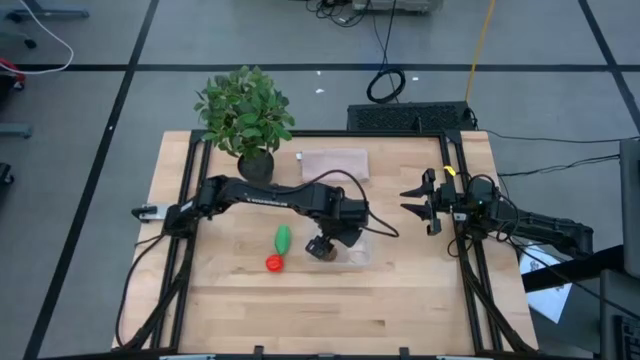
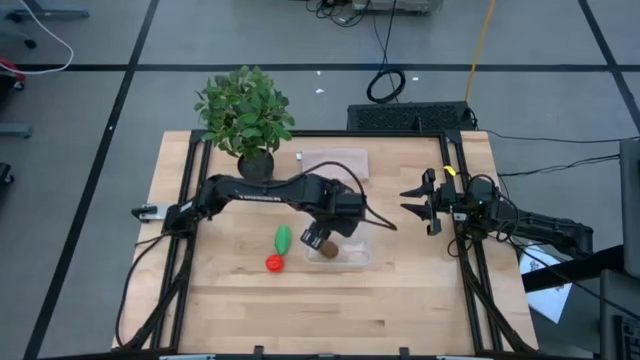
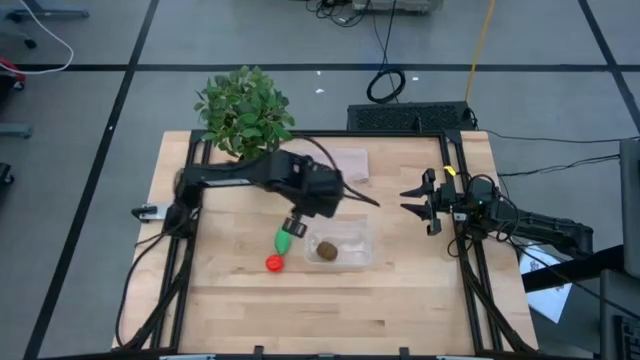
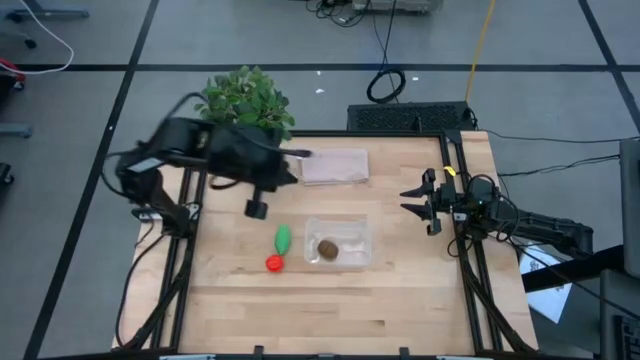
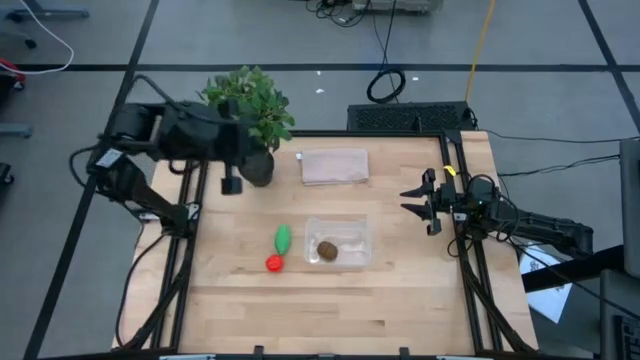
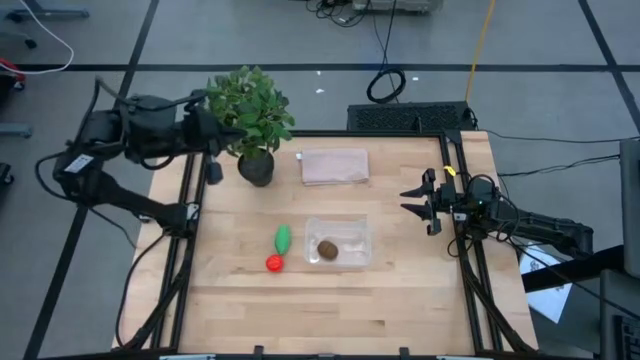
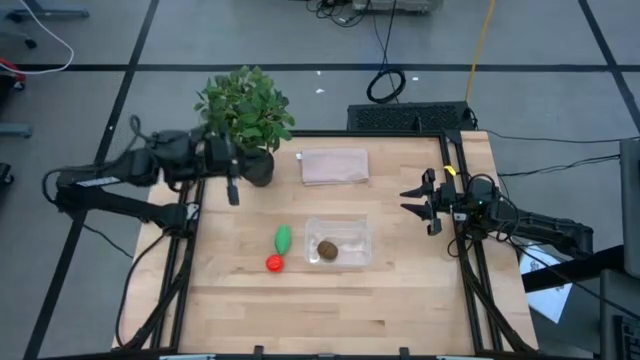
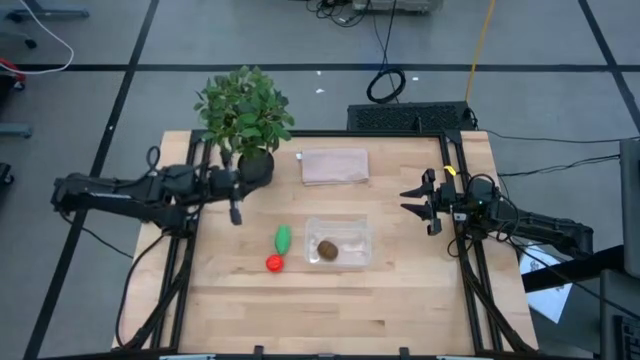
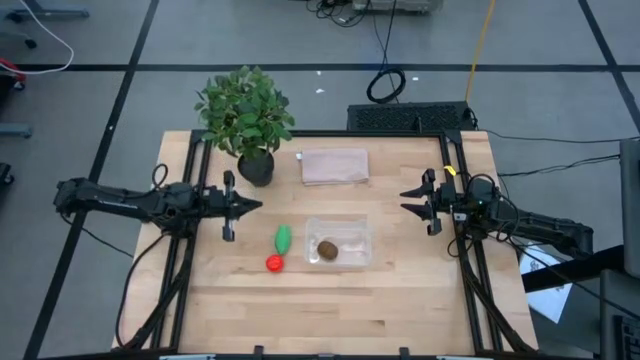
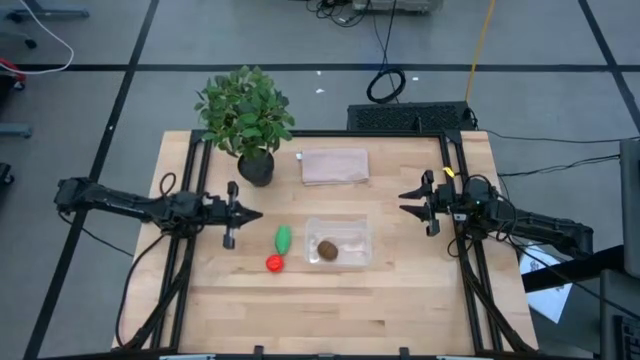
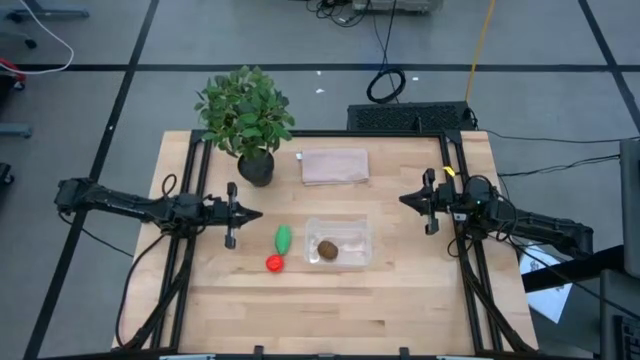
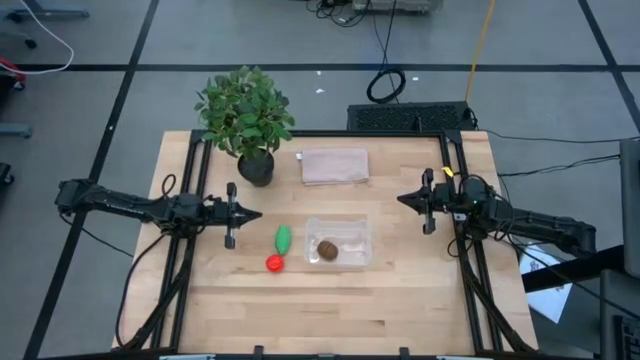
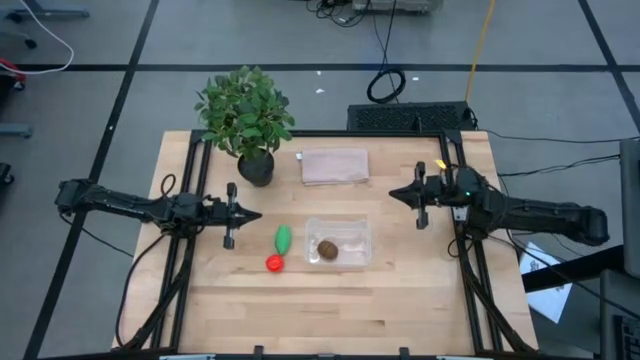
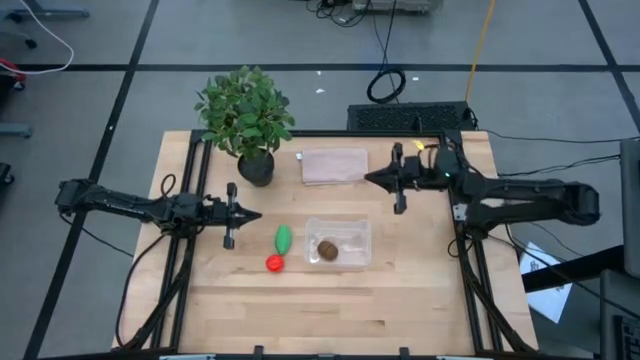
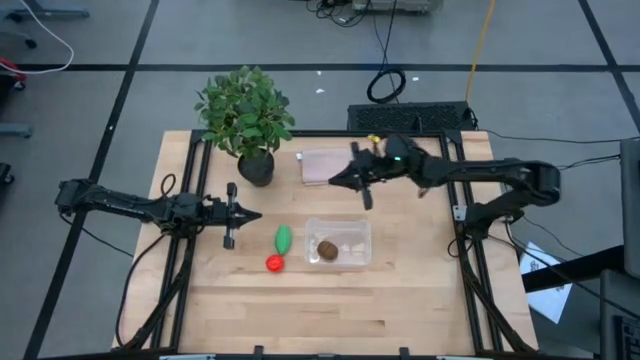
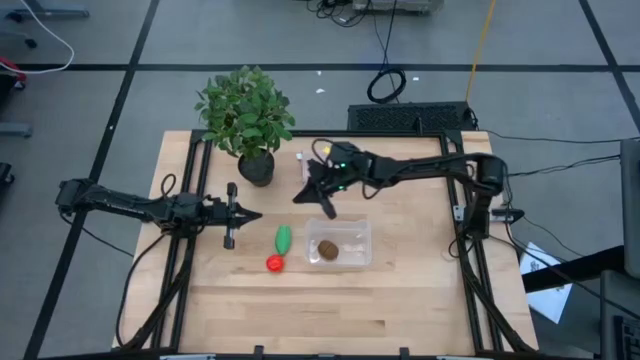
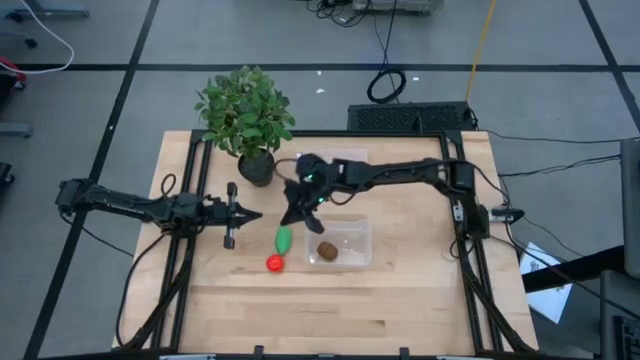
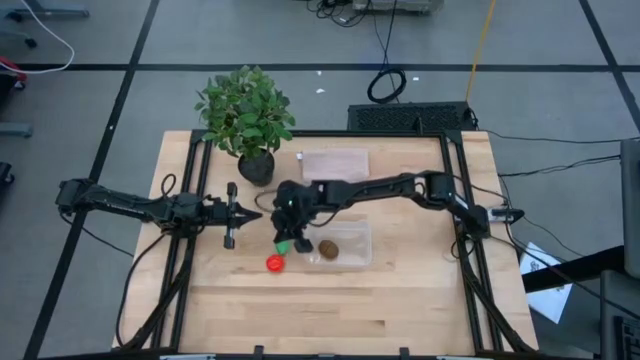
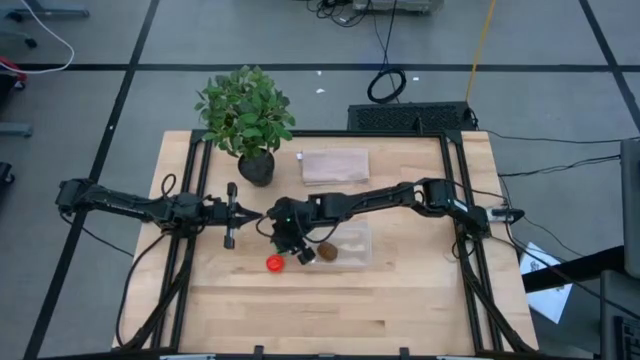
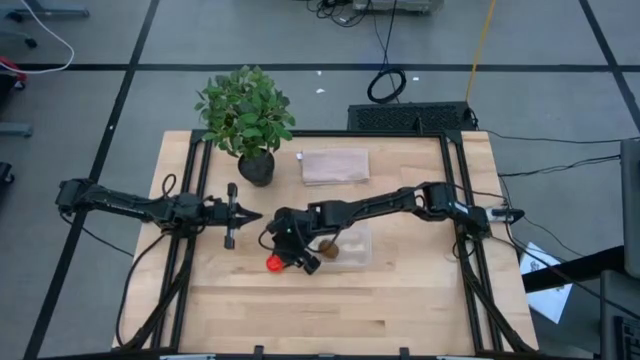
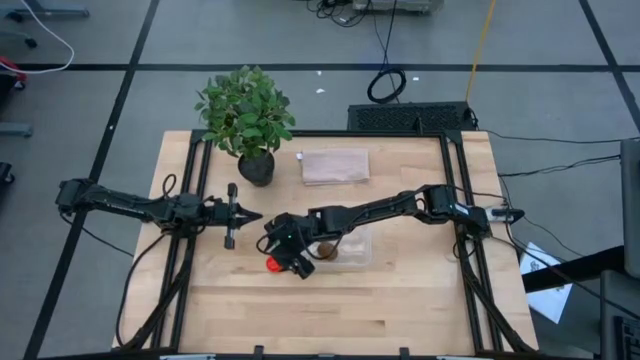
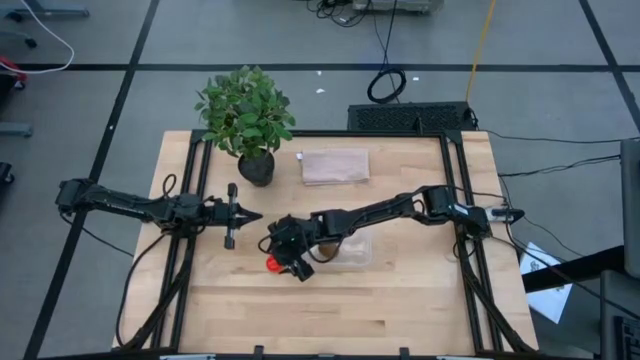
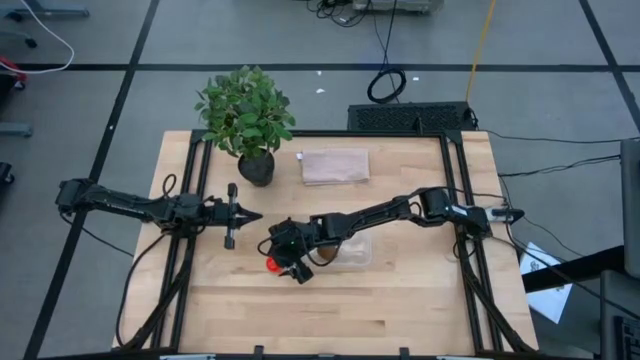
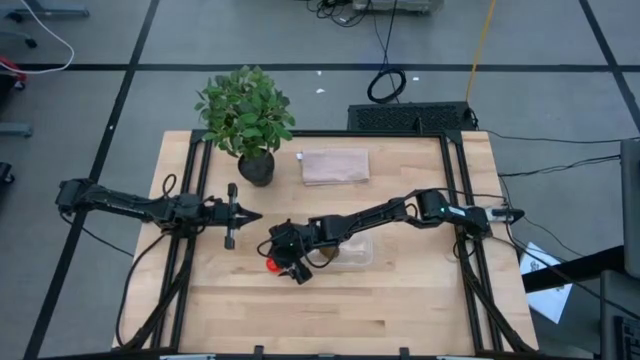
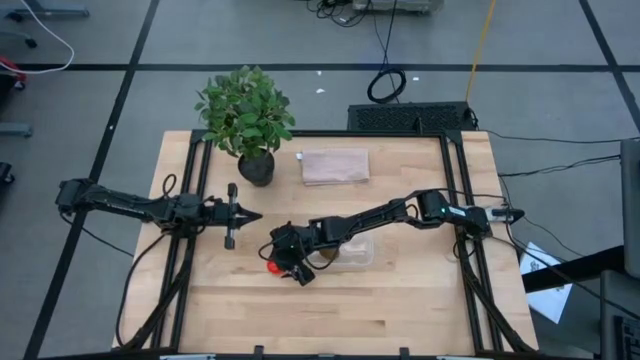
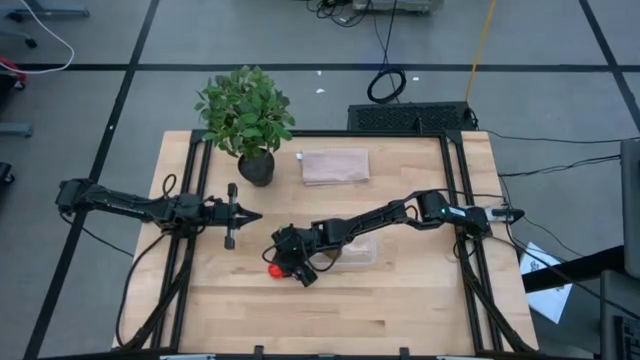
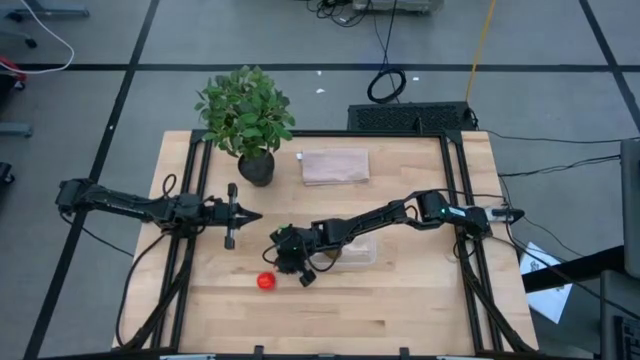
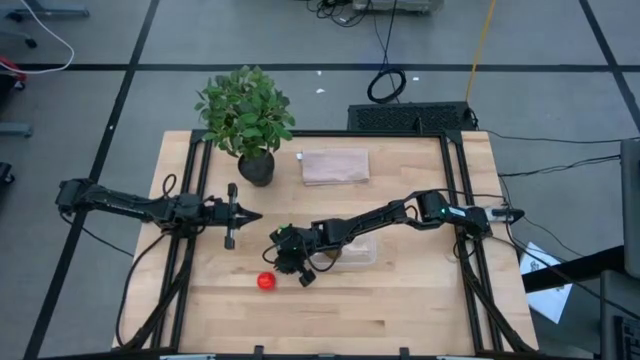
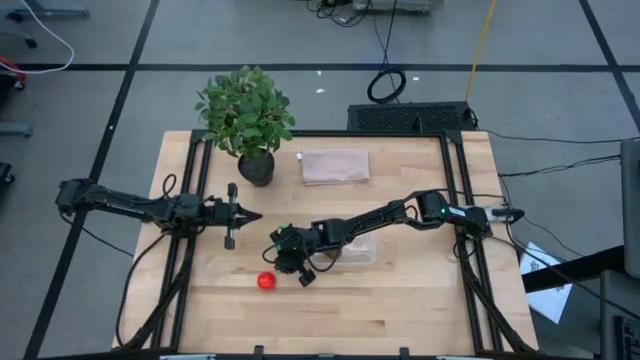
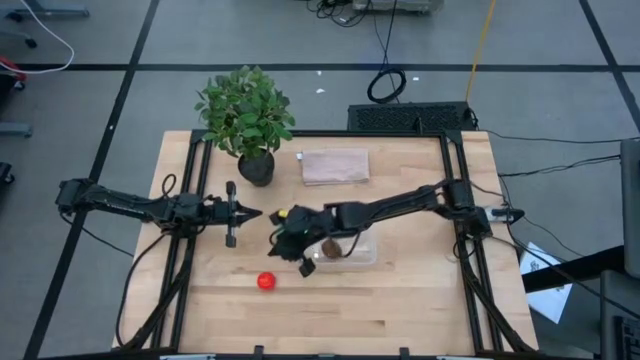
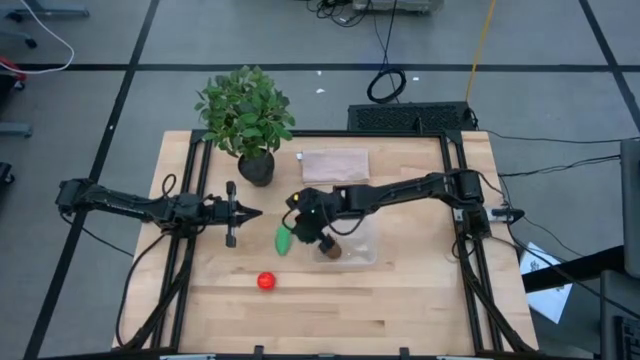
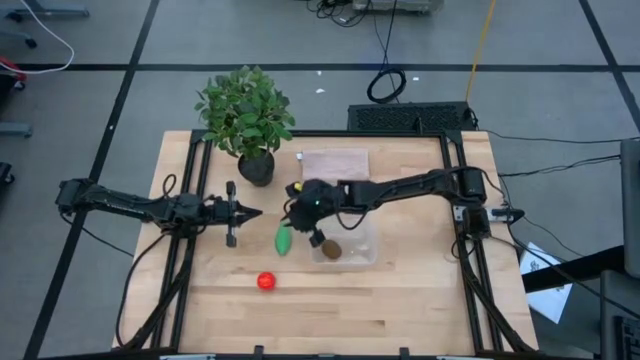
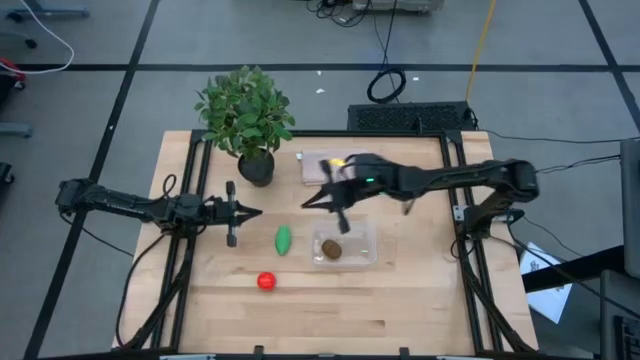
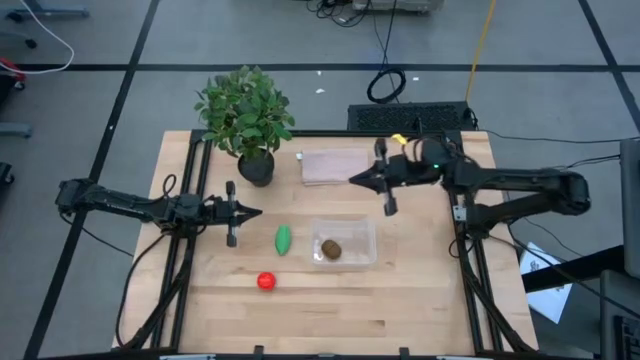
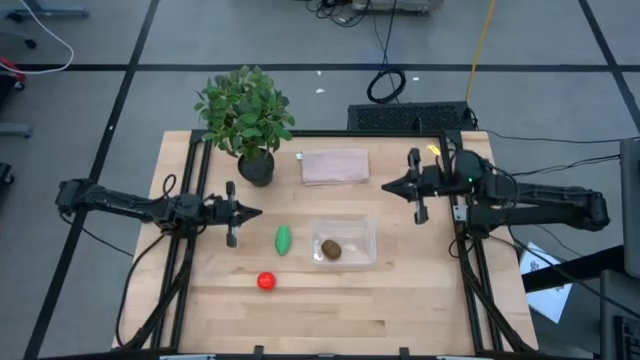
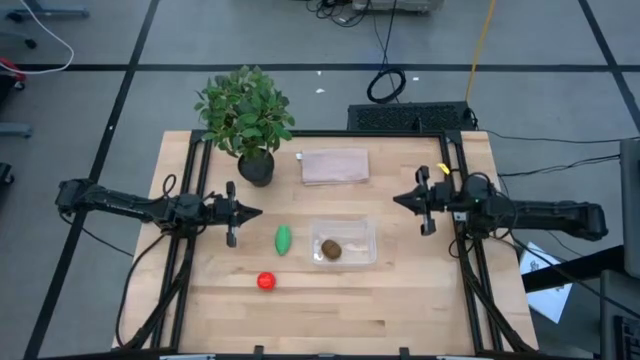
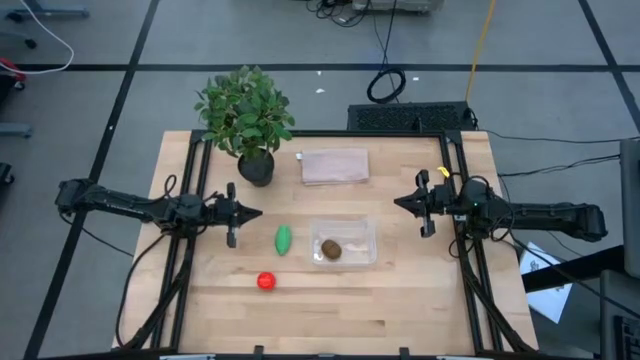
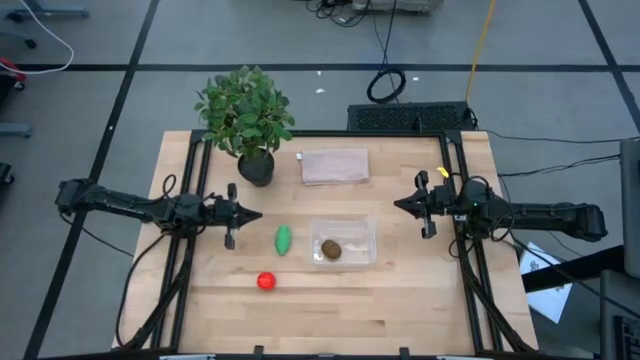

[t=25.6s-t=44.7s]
Task: Pick and placing Produce into tupperware
Put the red tomato into the transparent bin
